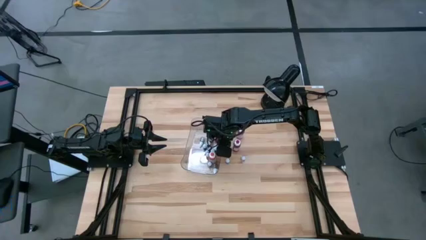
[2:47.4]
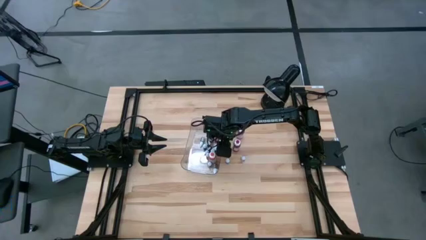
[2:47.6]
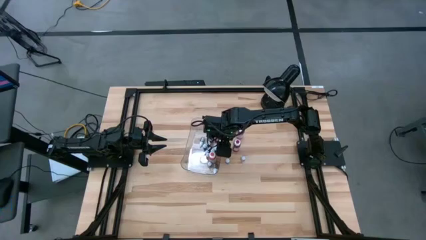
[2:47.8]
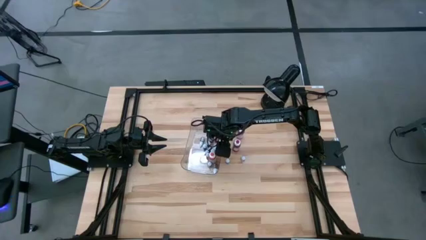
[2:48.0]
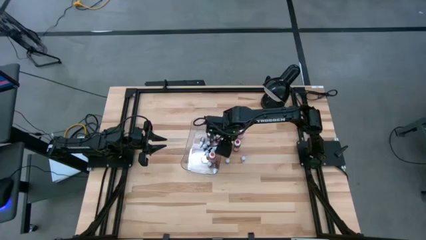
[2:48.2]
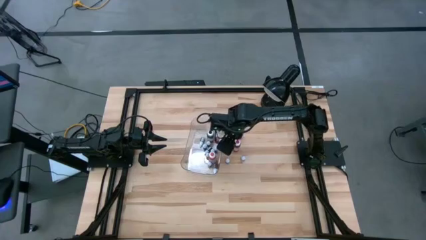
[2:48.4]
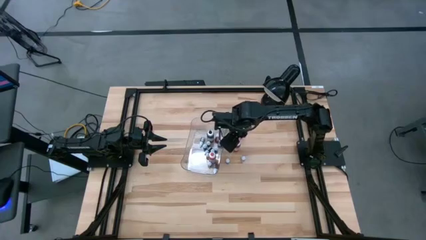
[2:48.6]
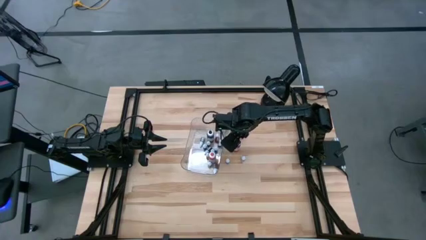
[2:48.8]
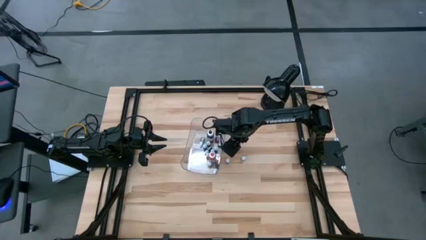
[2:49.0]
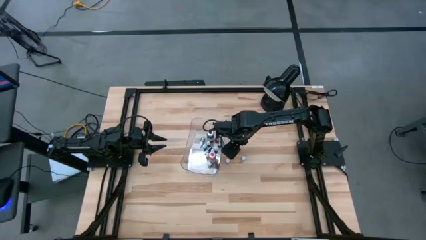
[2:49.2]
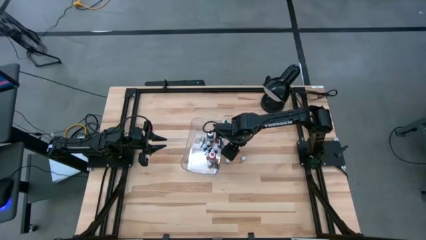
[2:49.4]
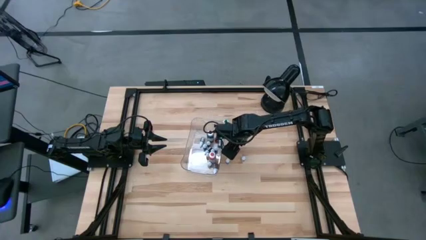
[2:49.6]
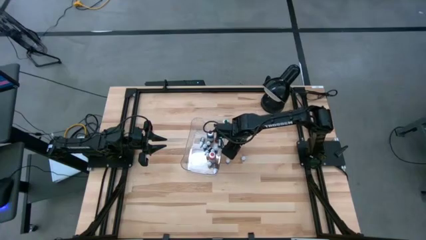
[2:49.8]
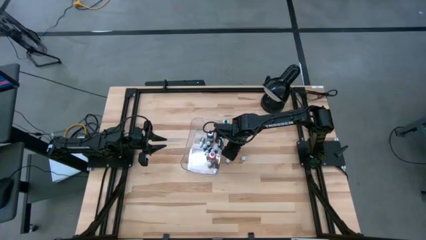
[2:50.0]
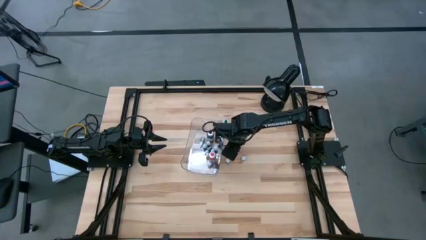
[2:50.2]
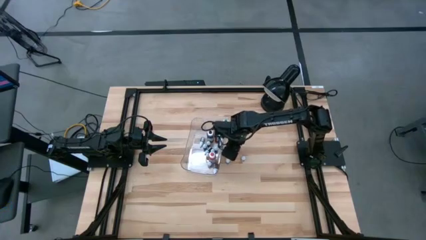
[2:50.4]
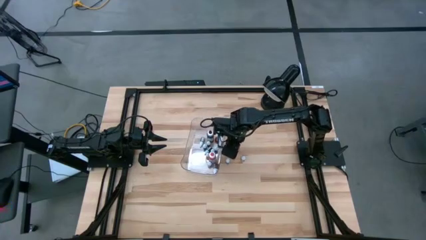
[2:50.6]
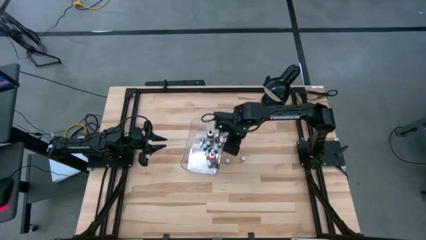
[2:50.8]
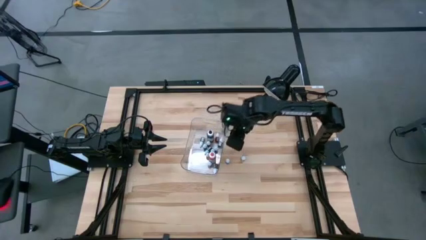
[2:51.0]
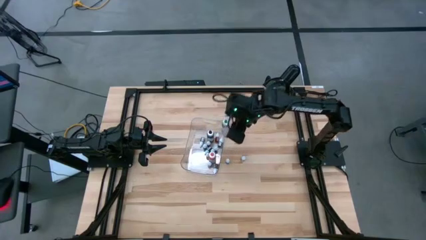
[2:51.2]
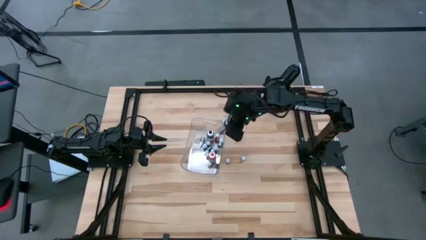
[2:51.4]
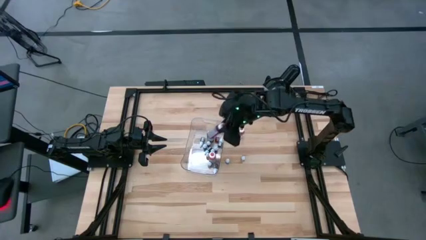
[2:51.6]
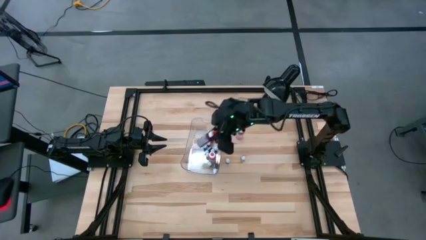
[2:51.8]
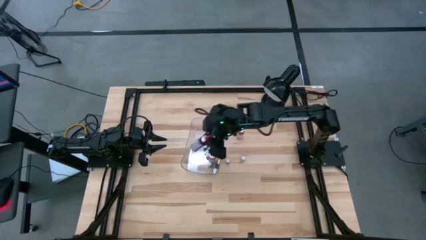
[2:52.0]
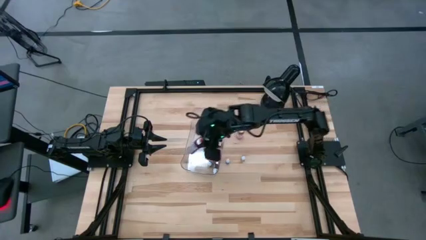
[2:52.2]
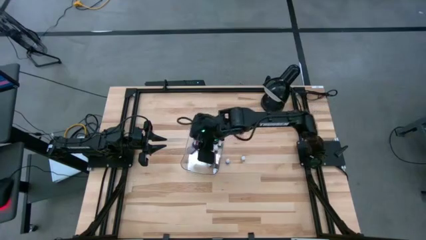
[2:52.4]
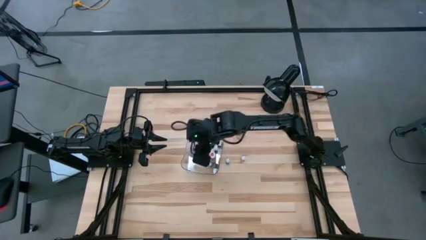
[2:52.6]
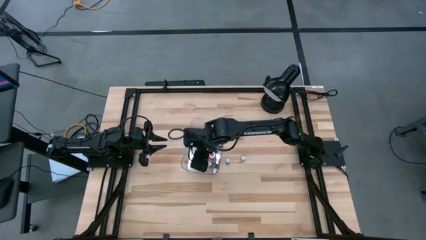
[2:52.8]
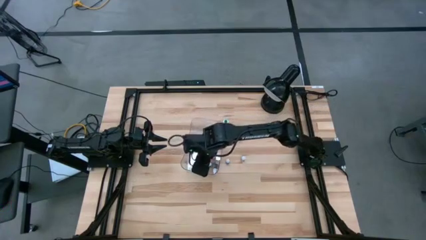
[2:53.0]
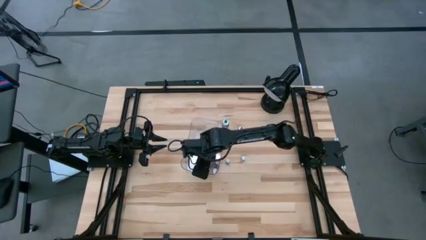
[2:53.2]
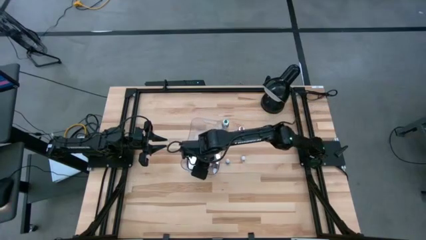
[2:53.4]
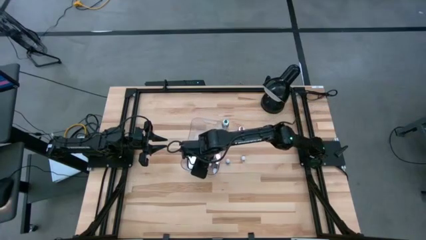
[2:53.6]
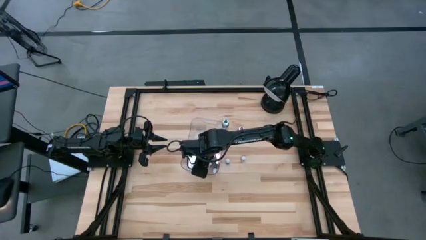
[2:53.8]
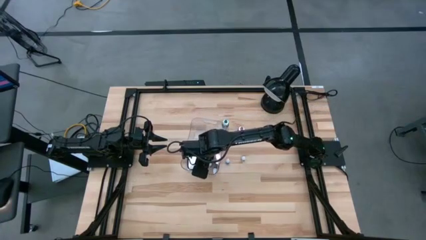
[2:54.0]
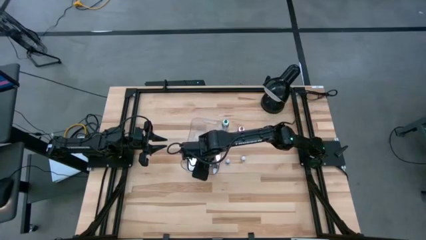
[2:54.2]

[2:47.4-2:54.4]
Task: Pick & Place food coloring
Put the large red food coloring bottle into the transparent bin

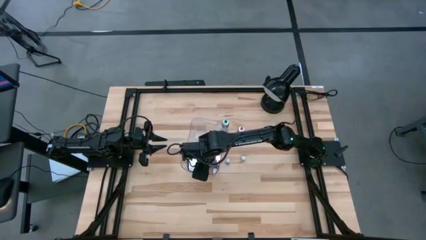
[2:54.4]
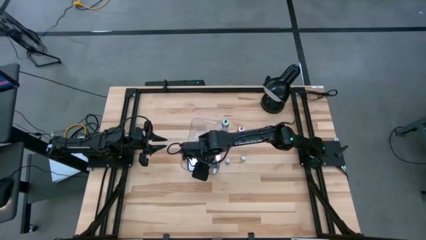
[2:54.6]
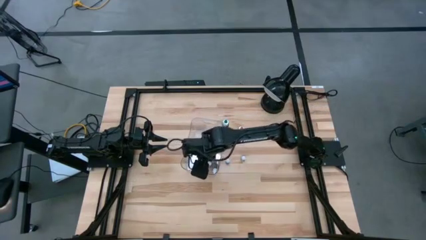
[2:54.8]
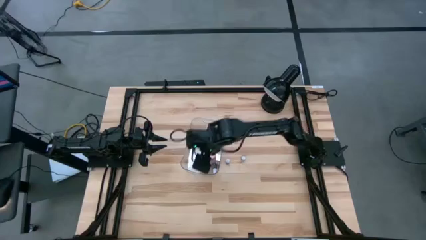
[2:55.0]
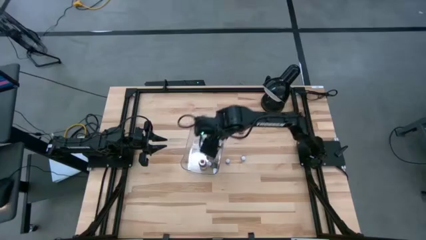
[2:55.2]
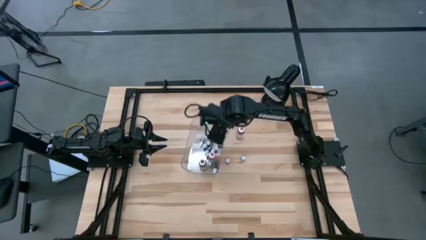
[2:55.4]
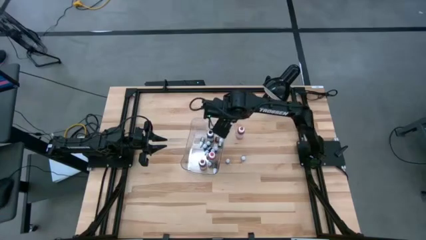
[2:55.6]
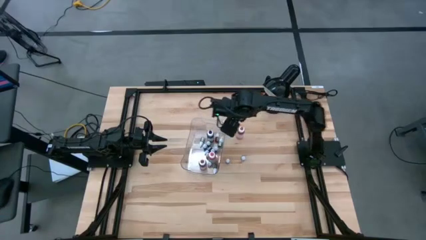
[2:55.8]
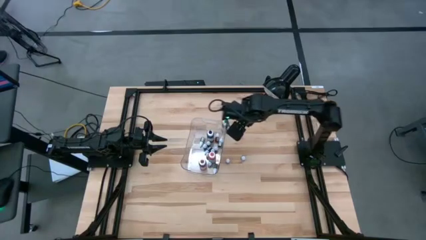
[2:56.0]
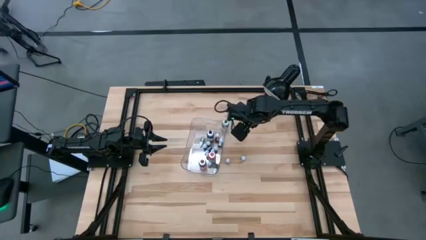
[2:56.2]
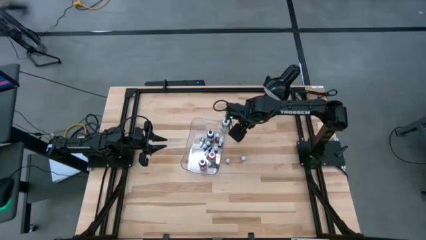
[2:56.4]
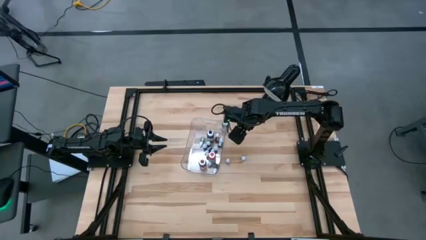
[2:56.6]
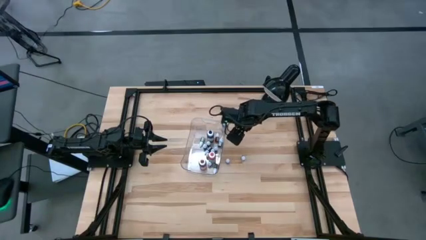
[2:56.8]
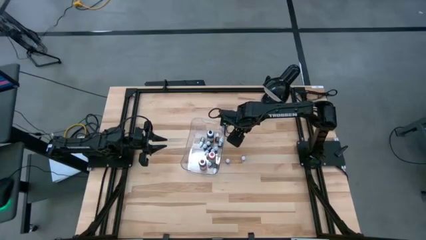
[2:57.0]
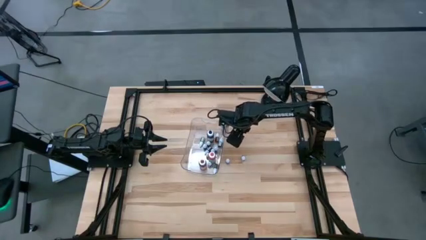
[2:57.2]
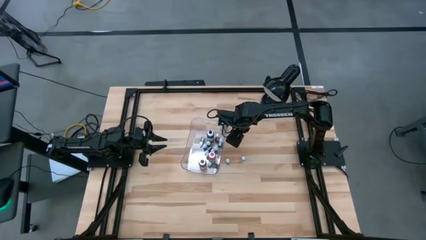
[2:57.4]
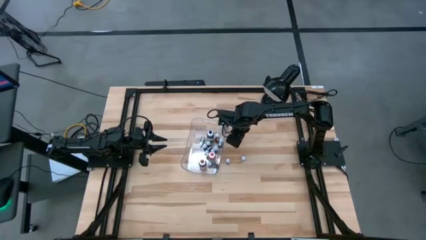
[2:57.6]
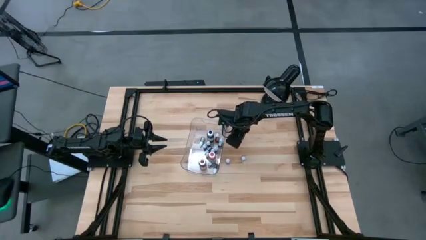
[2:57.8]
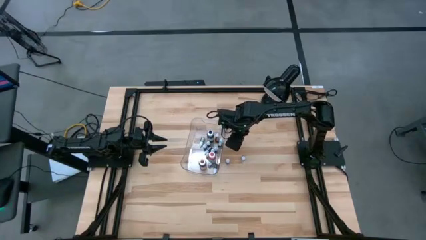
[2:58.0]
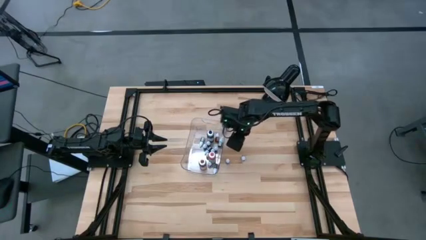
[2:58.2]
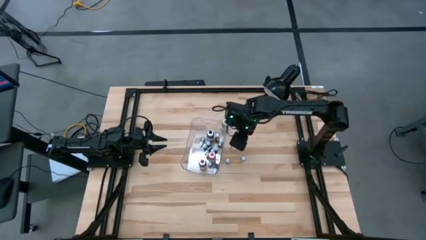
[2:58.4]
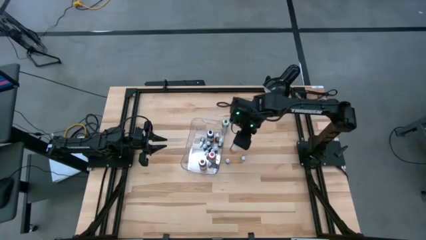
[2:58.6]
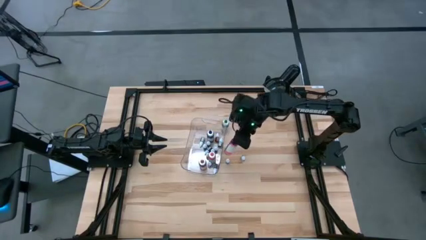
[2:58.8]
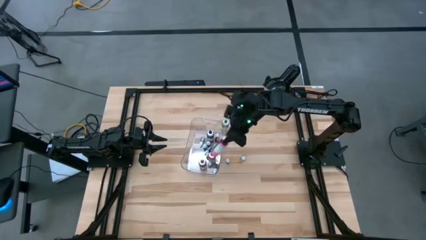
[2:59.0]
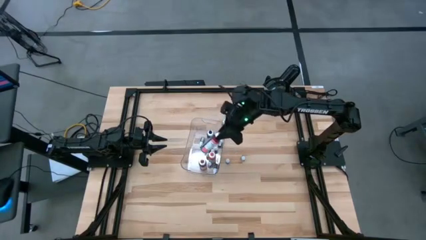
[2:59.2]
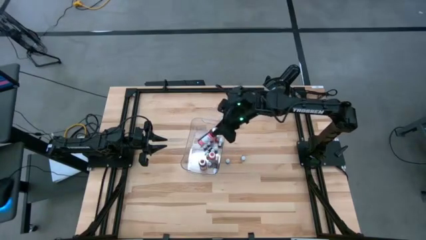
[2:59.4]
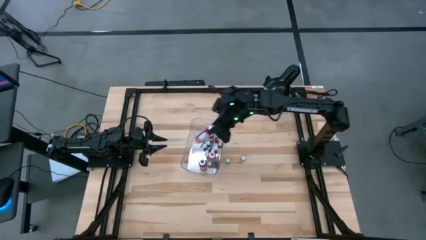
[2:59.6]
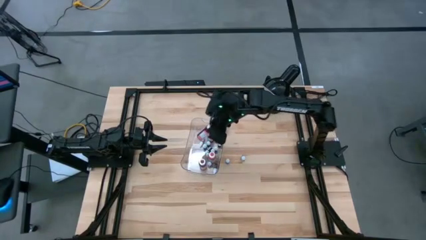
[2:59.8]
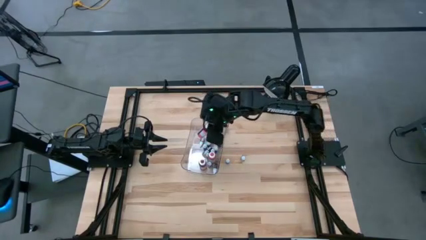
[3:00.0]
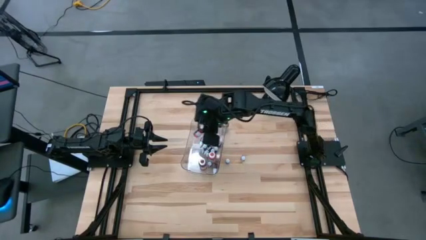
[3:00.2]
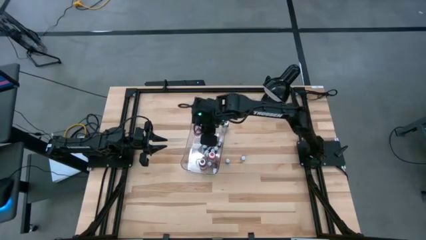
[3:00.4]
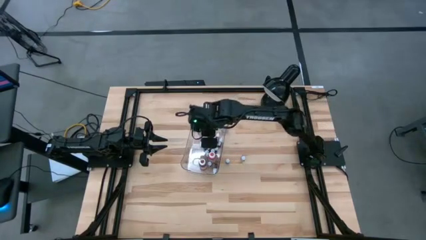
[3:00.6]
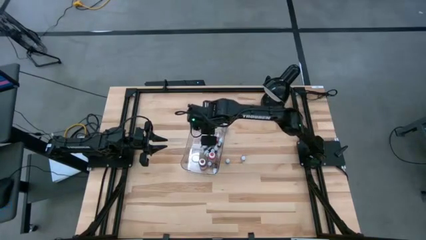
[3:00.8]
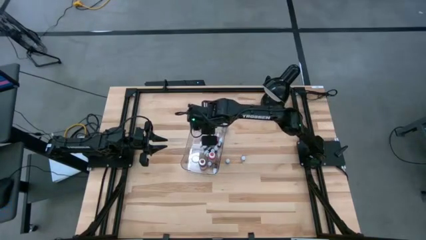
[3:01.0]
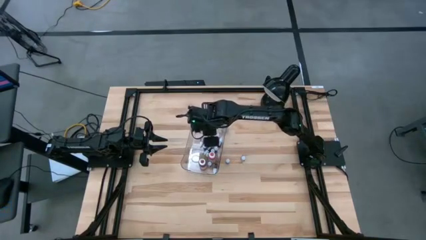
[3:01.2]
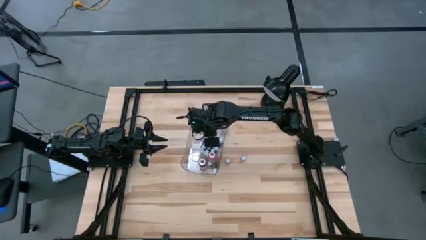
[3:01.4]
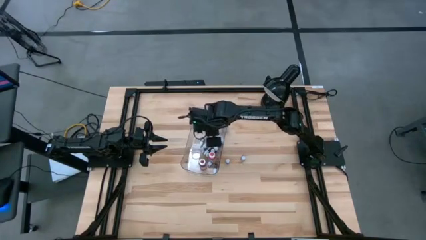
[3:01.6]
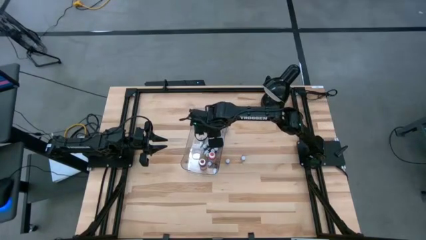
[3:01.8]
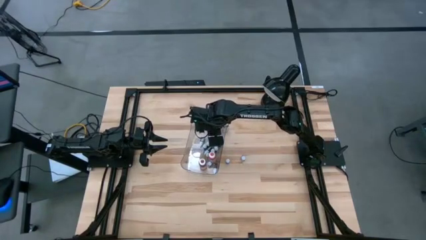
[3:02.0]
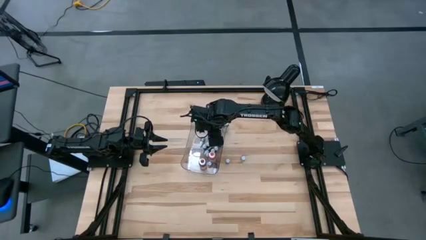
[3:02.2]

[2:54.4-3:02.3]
Put the large pink food coloring bottle into the transparent bin

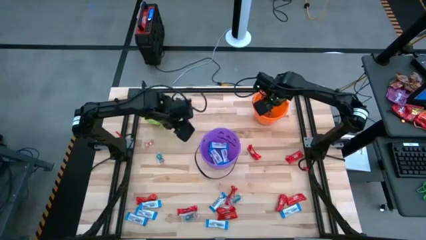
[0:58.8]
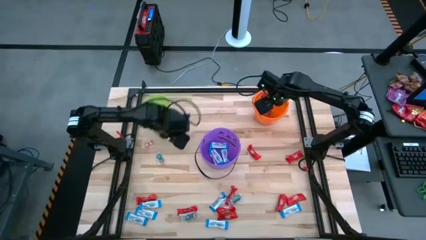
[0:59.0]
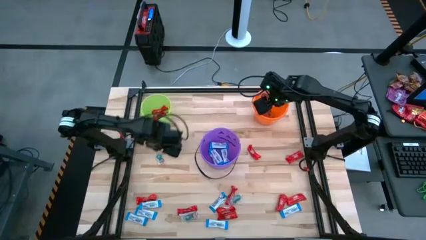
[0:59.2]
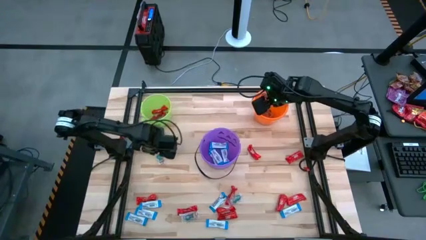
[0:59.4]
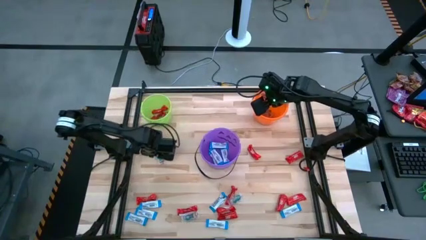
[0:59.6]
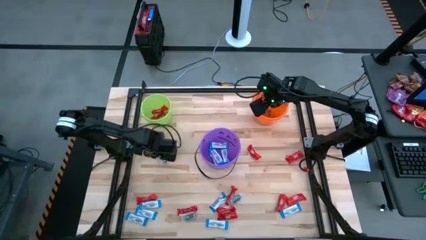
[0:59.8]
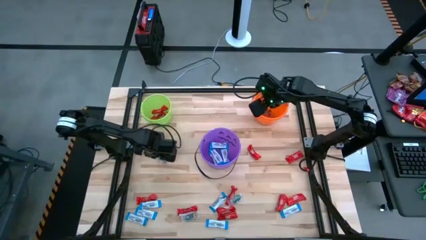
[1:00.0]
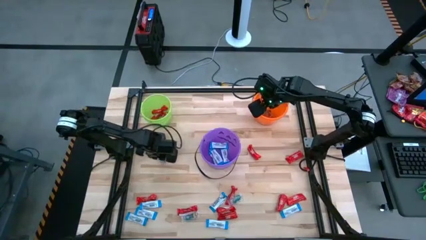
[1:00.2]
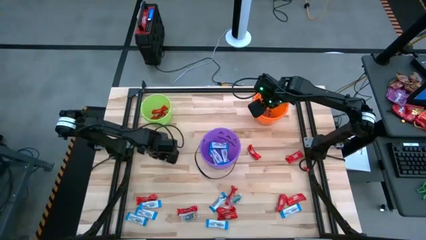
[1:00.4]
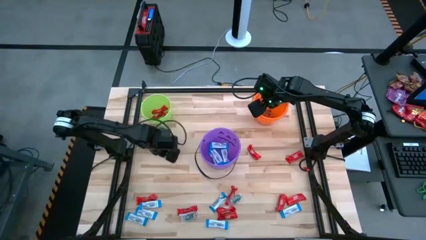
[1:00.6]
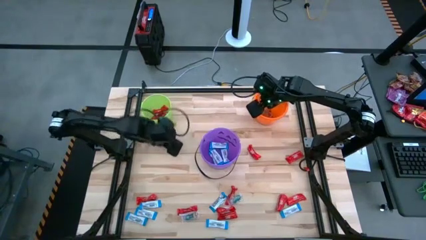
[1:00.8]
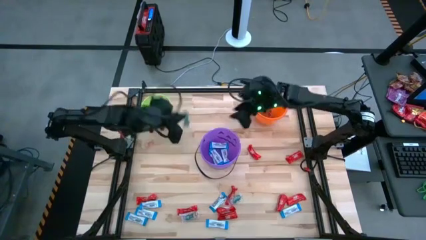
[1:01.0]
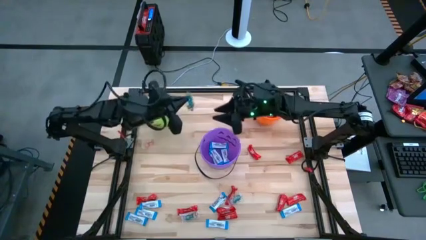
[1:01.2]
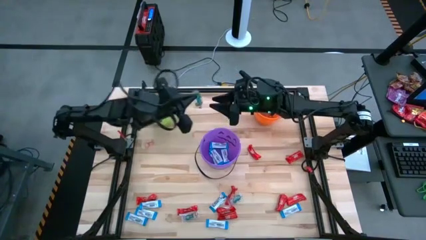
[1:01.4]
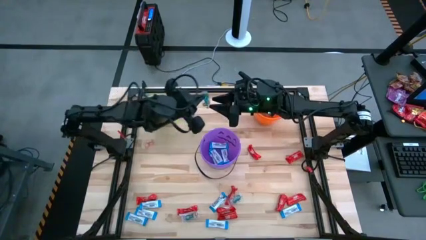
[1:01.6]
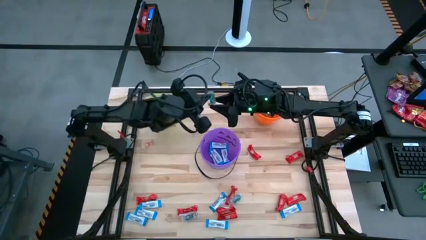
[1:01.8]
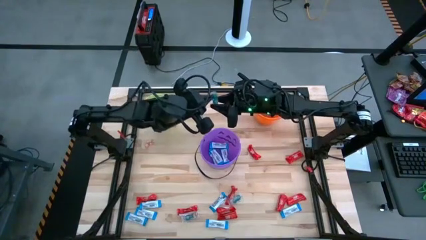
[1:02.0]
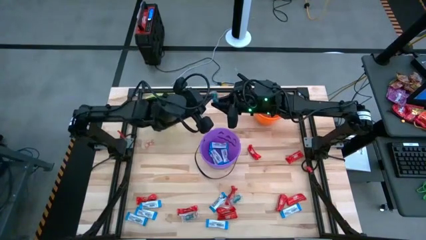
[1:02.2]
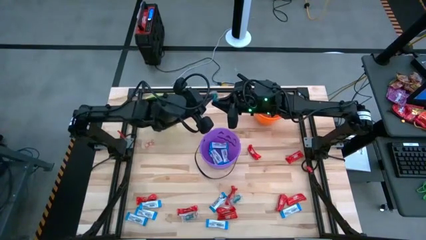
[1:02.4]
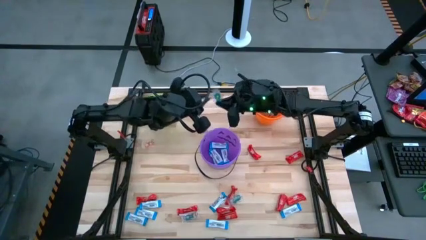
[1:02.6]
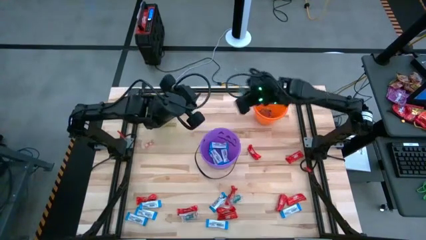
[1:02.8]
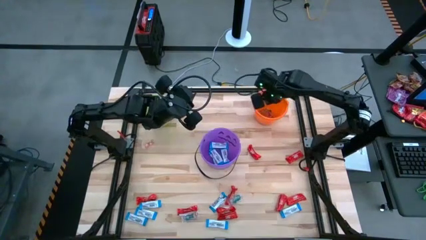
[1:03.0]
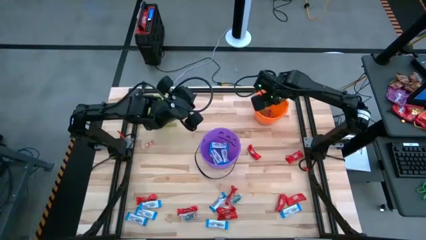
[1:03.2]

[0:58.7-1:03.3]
Task: Sort candy by brand, put in halloween buckets
Put the blue gummy into the orange bucket
